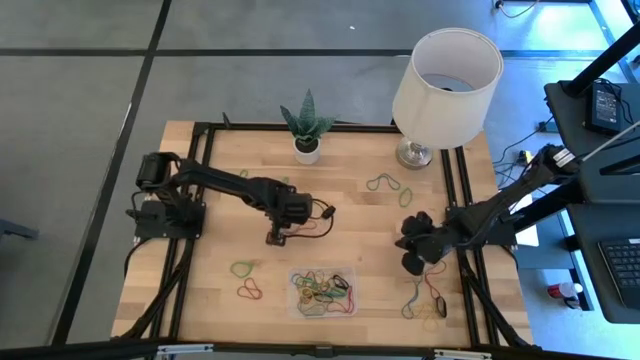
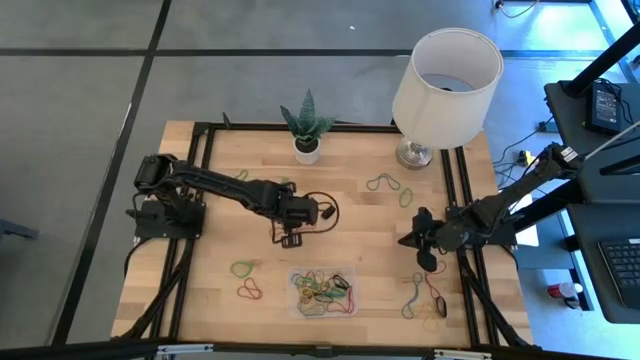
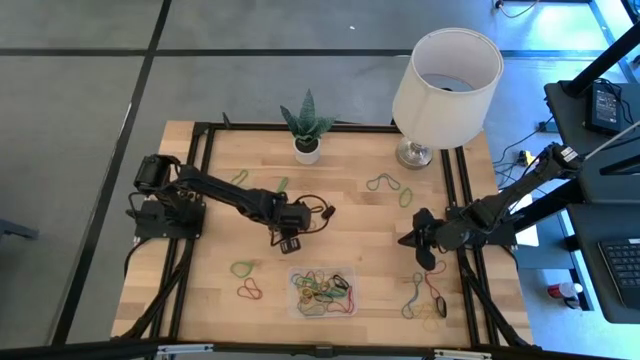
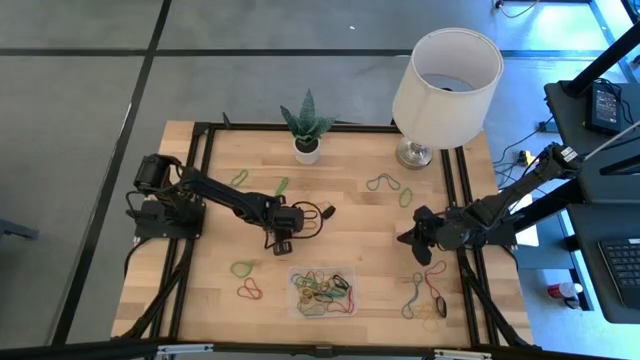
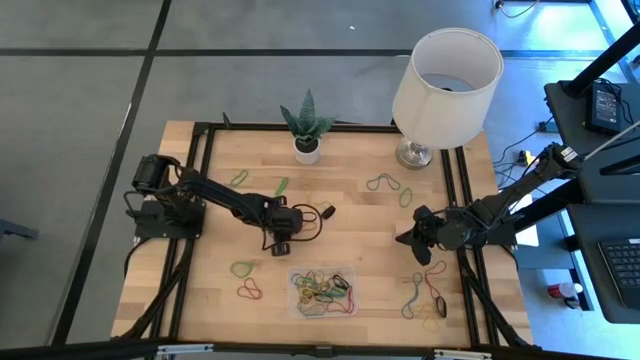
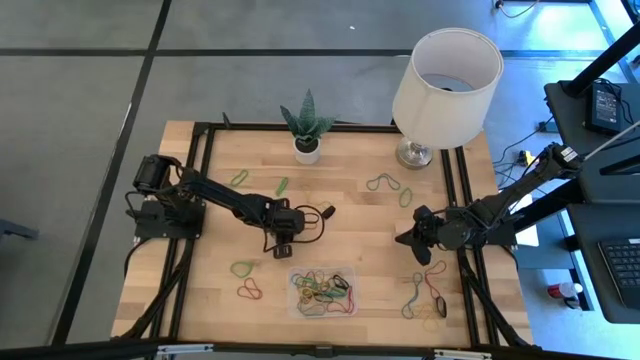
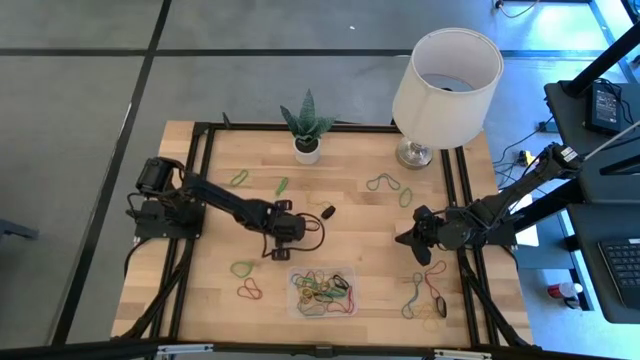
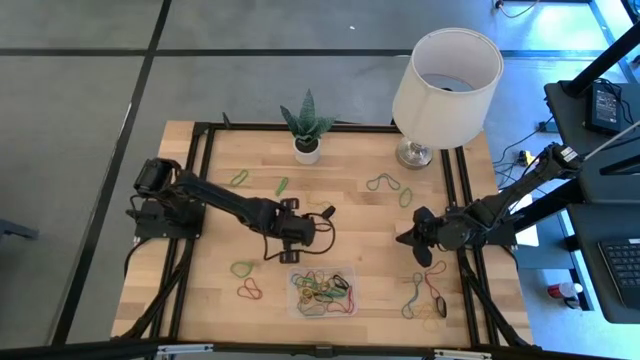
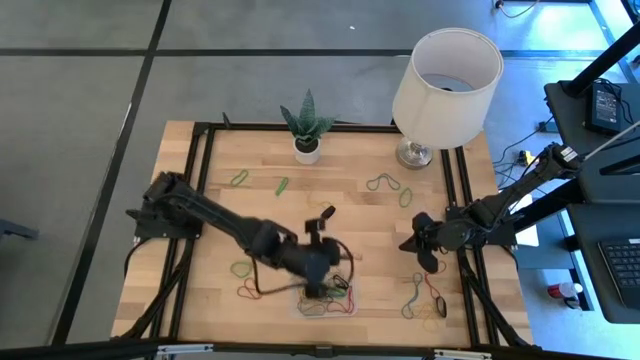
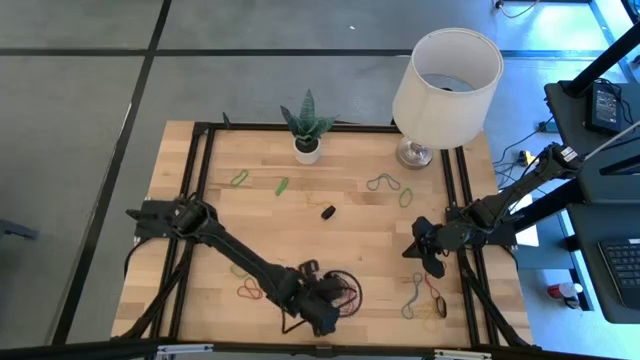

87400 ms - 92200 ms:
Task: Pick and place rubber bands into bin
Put the red rubber band into the transparent bin

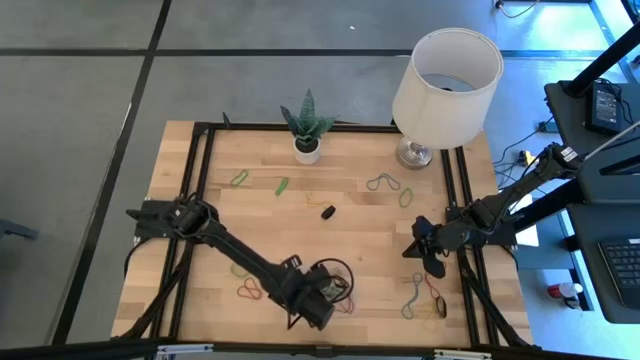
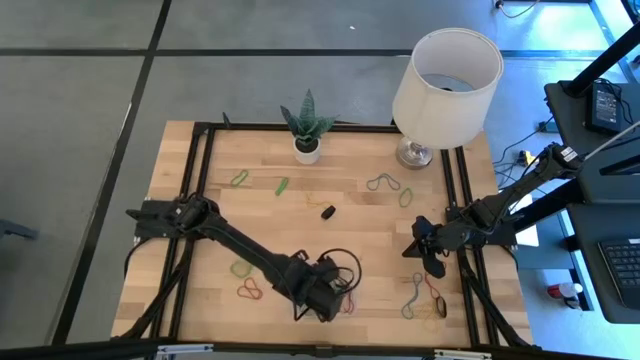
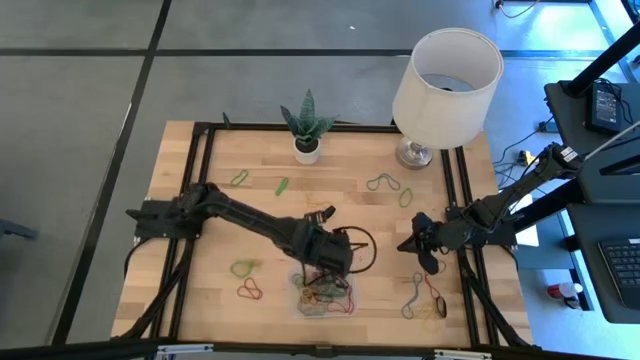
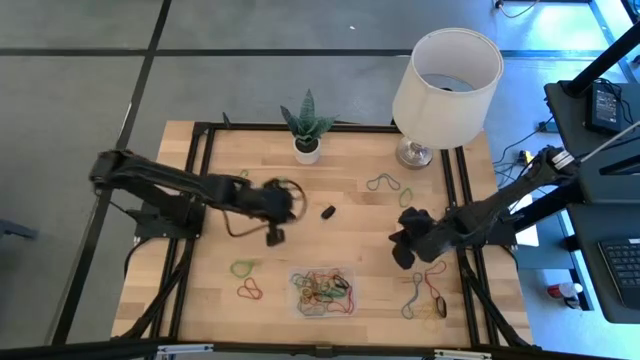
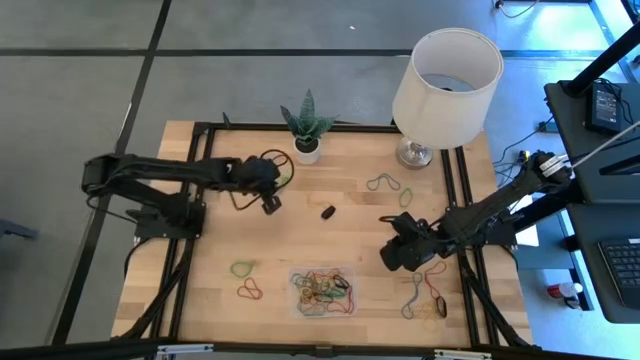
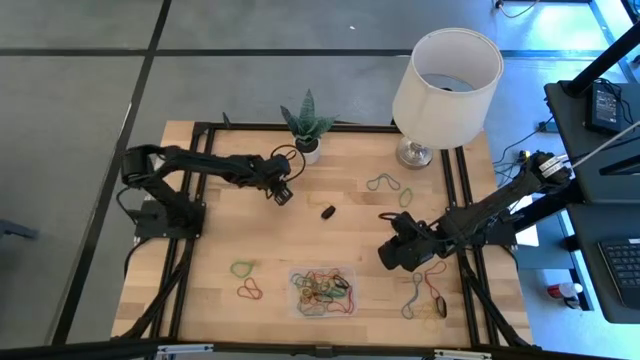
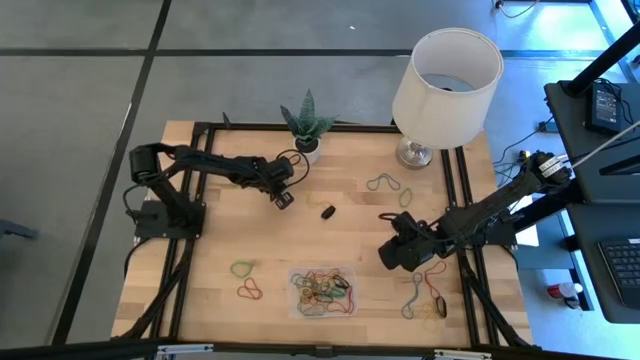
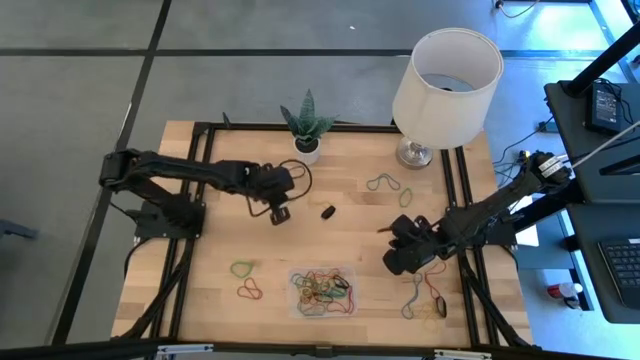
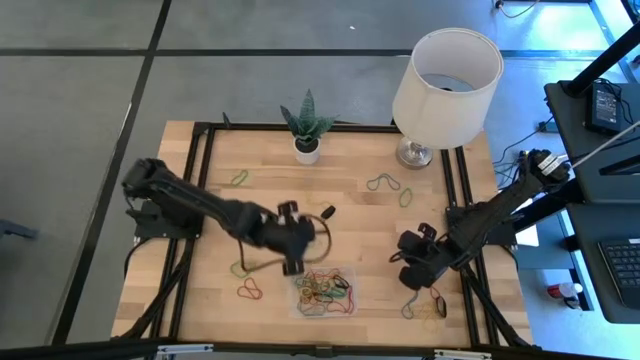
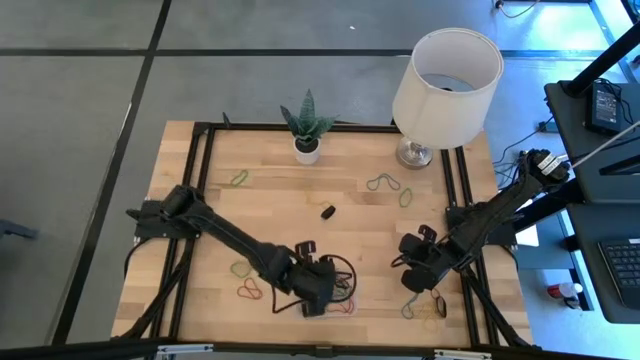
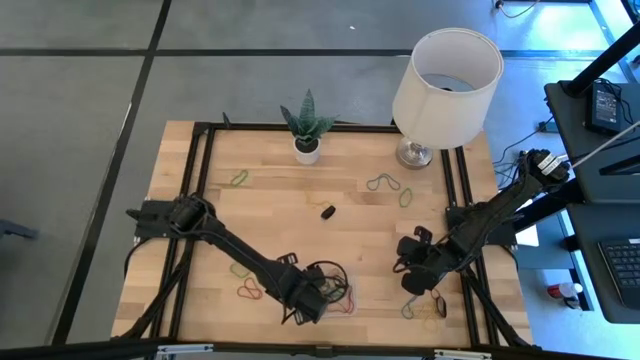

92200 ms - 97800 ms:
Put the green rubber band into the transparent bin

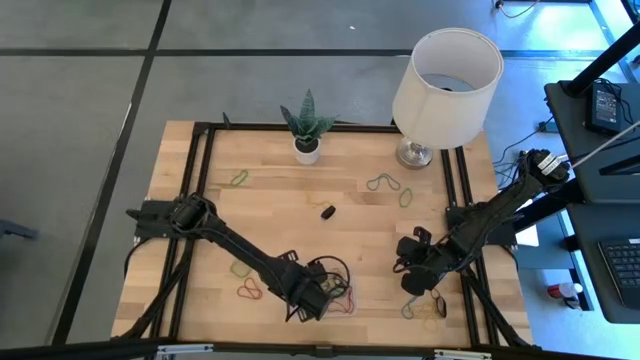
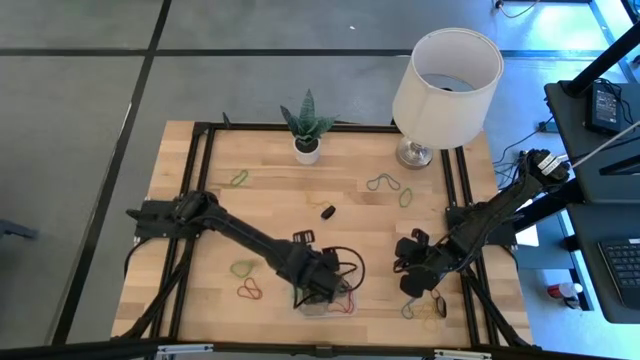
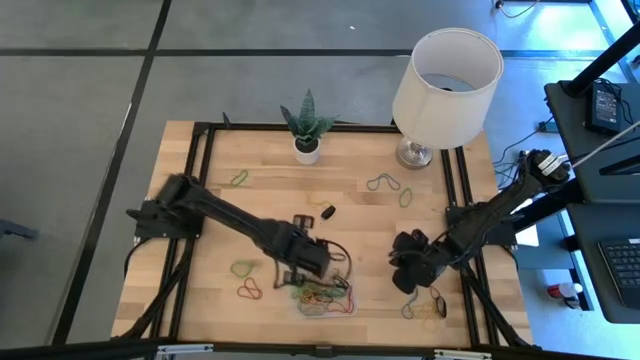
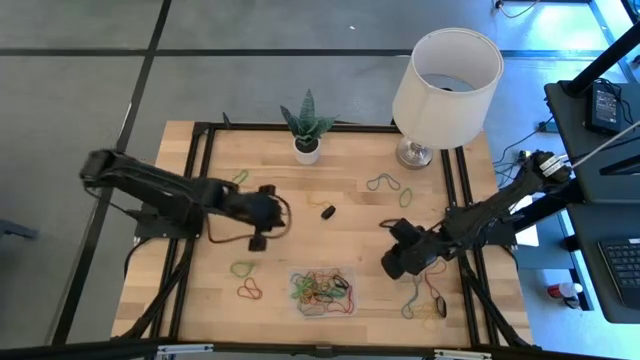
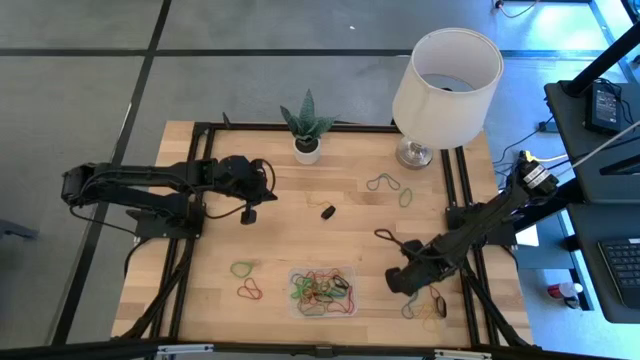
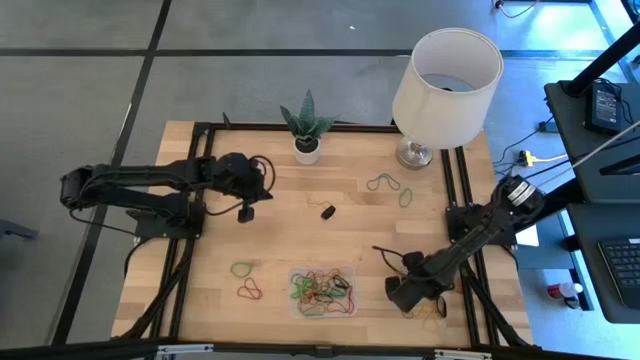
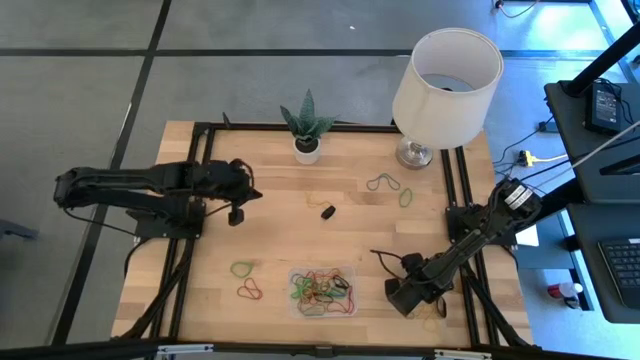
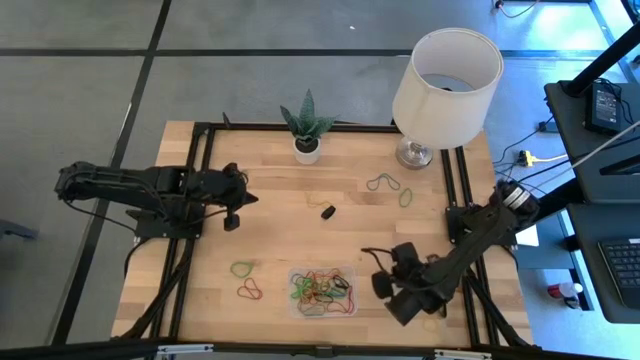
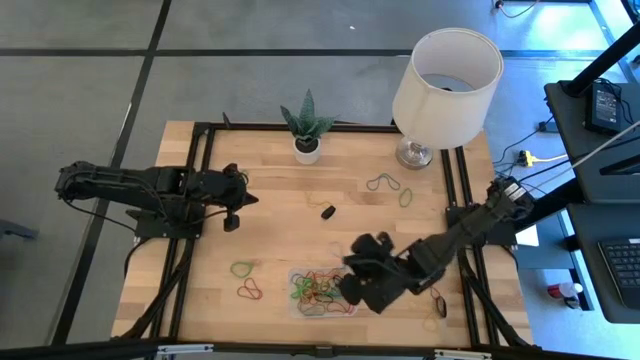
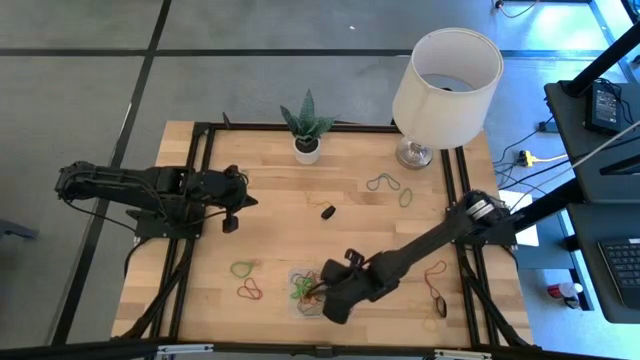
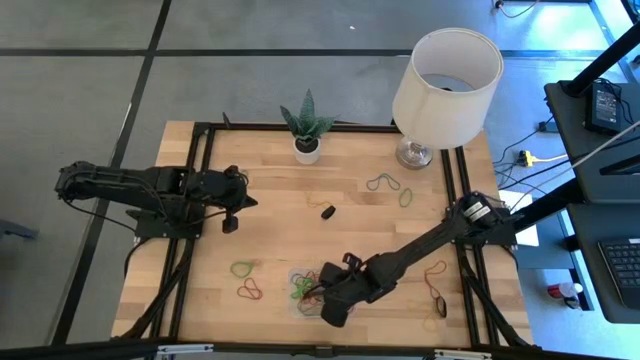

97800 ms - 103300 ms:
Put the blue rubber band into the transparent bin

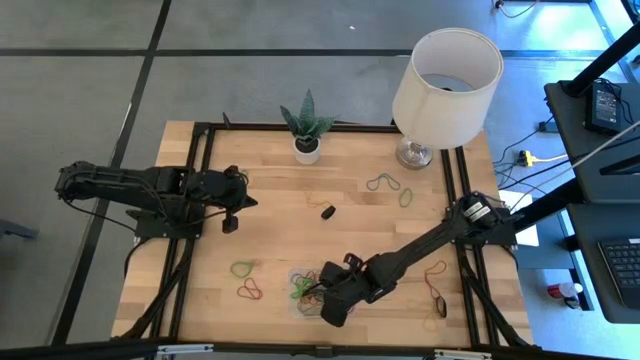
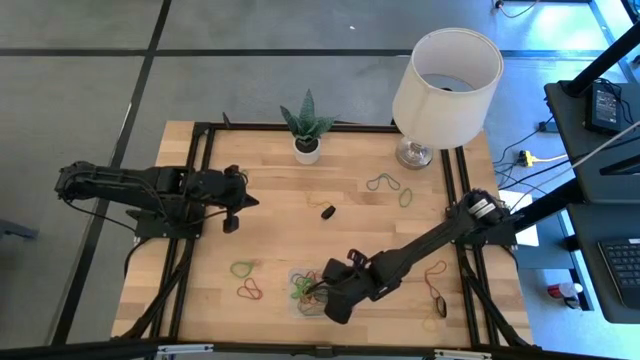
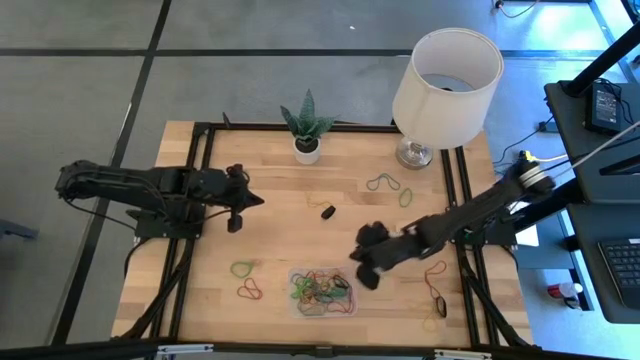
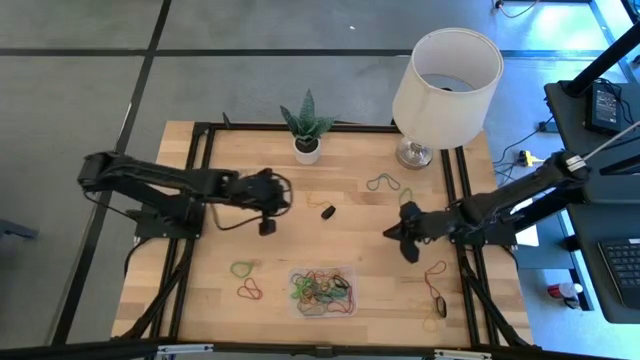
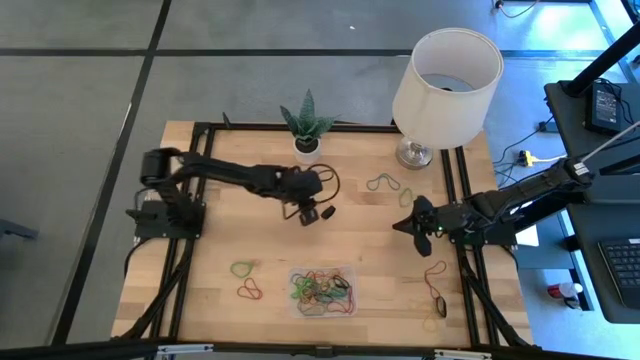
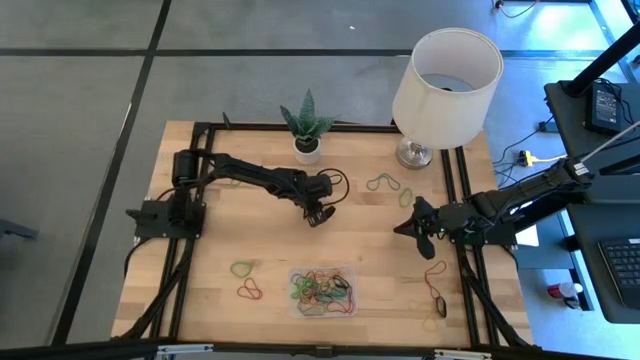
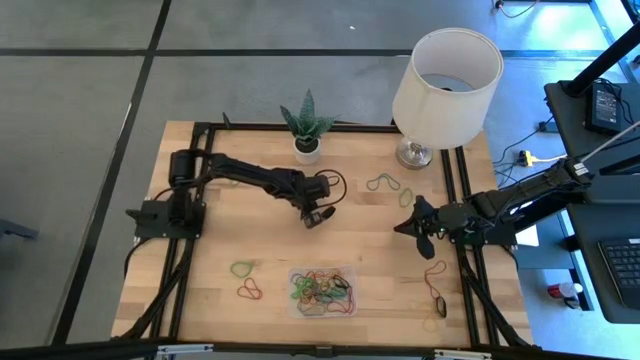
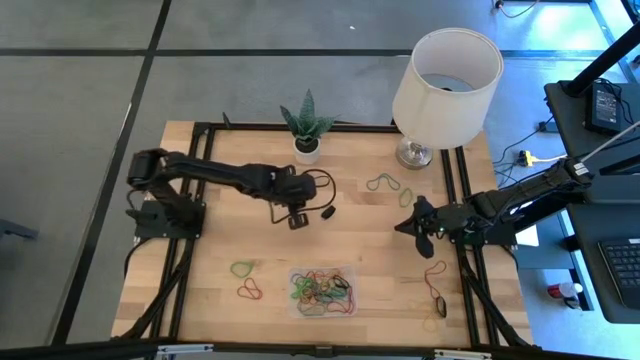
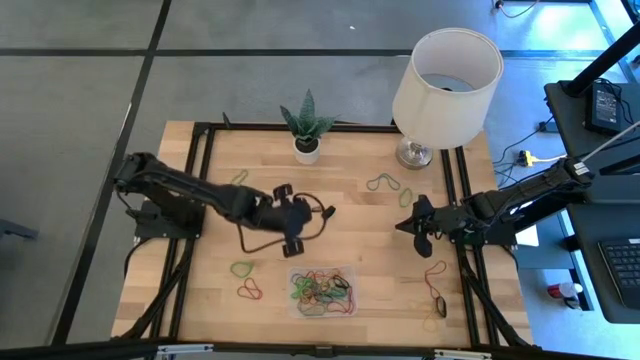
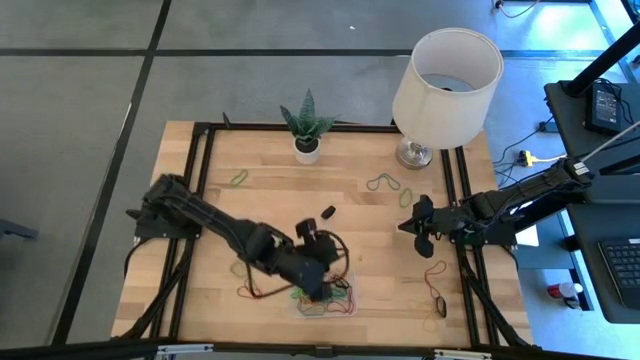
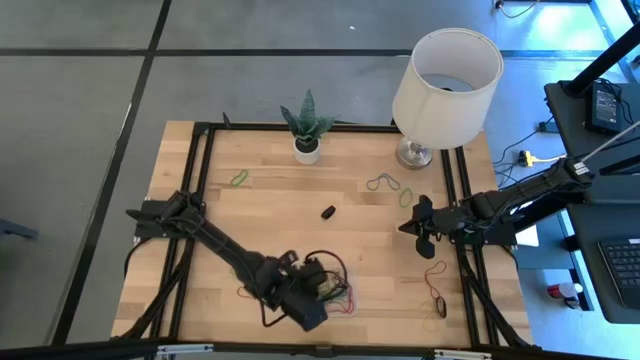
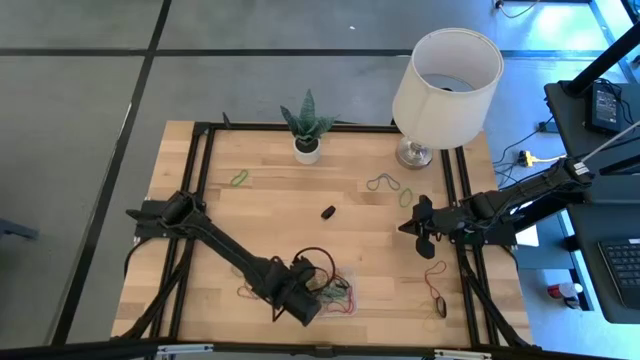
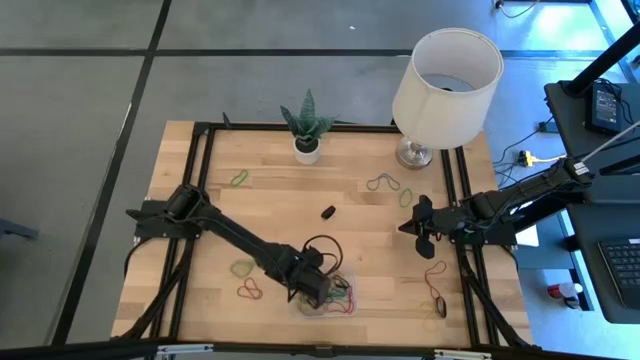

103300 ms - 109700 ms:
Put the yellow rubber band into the transparent bin
